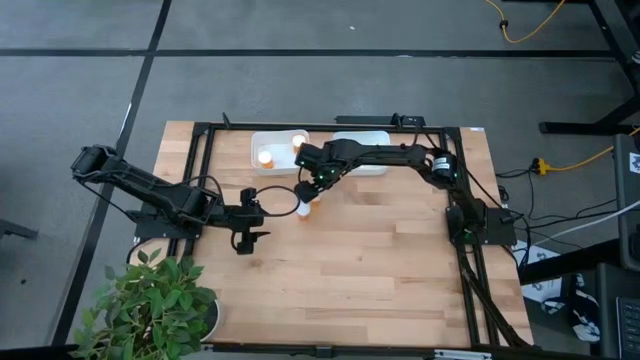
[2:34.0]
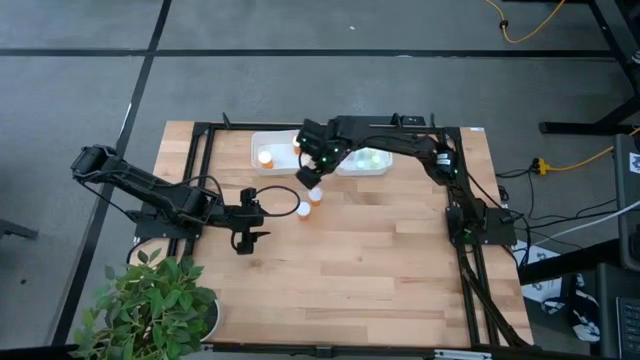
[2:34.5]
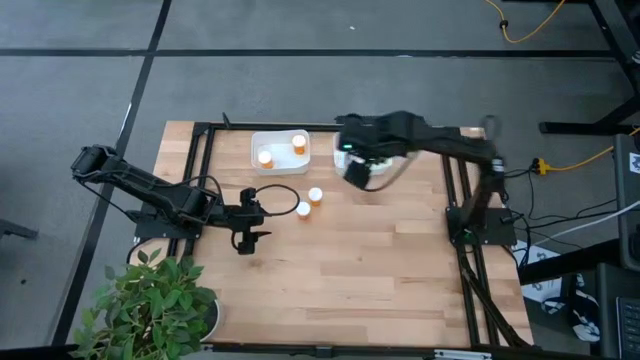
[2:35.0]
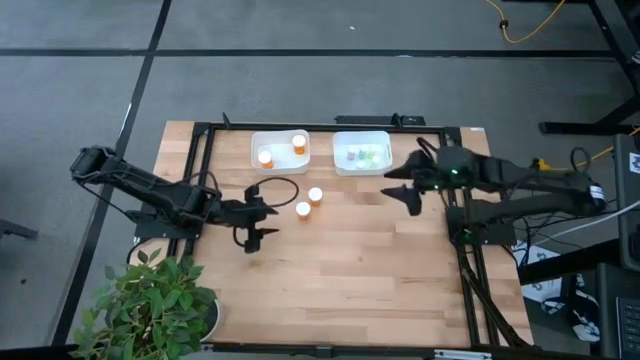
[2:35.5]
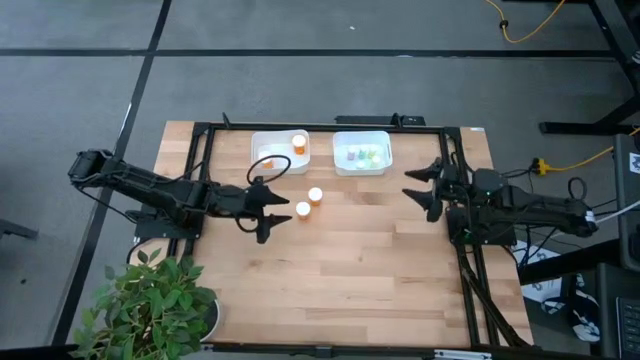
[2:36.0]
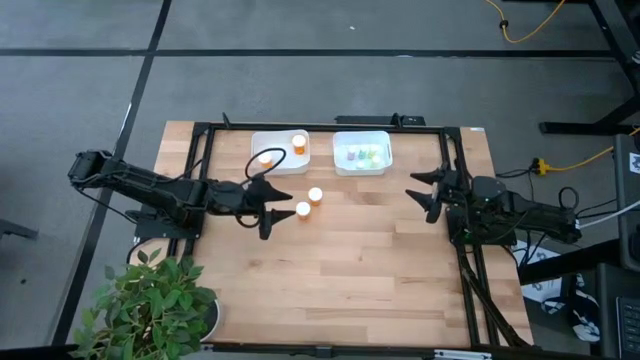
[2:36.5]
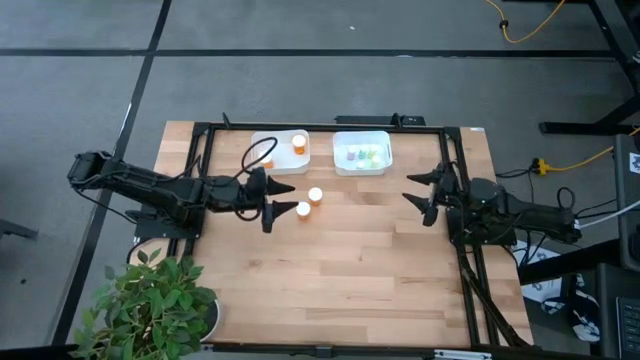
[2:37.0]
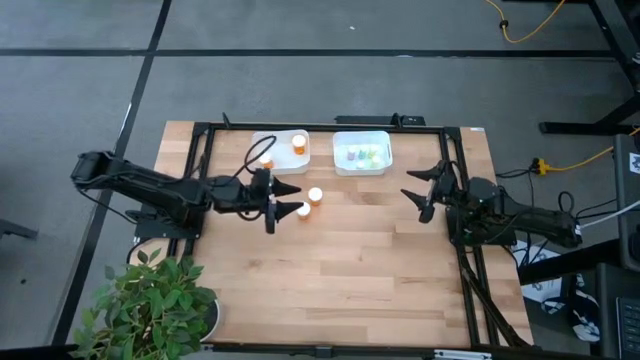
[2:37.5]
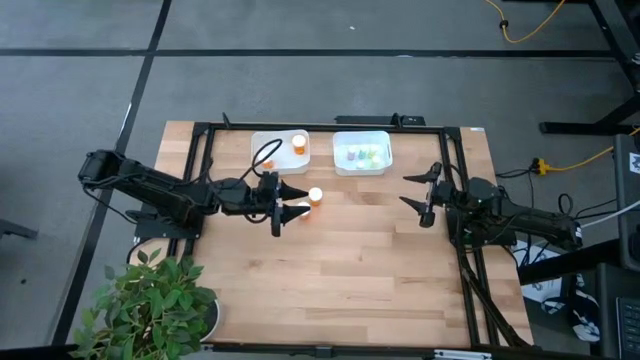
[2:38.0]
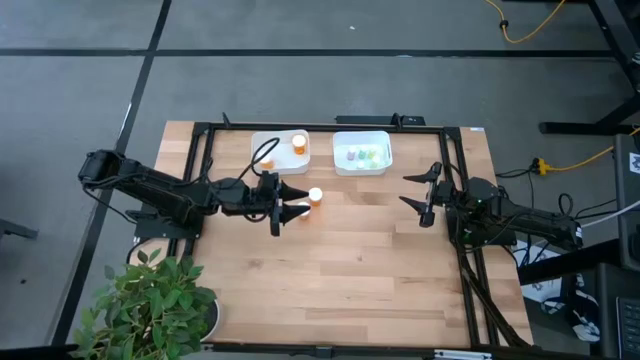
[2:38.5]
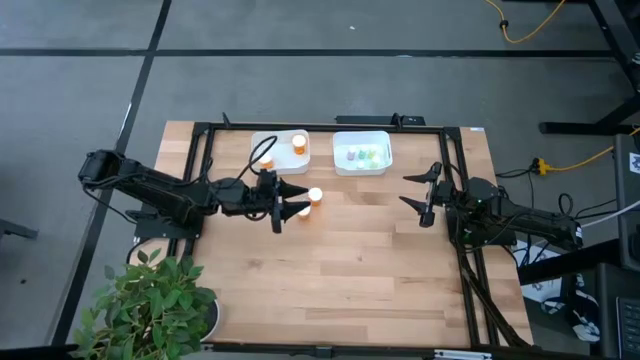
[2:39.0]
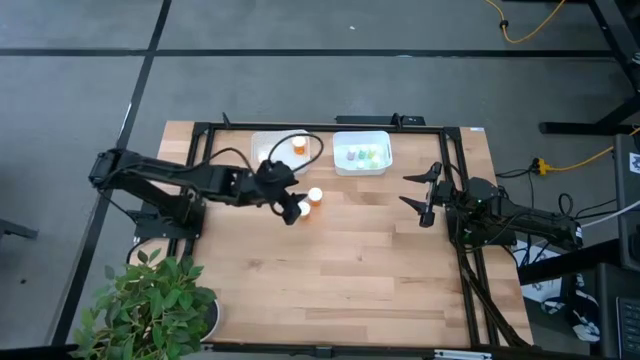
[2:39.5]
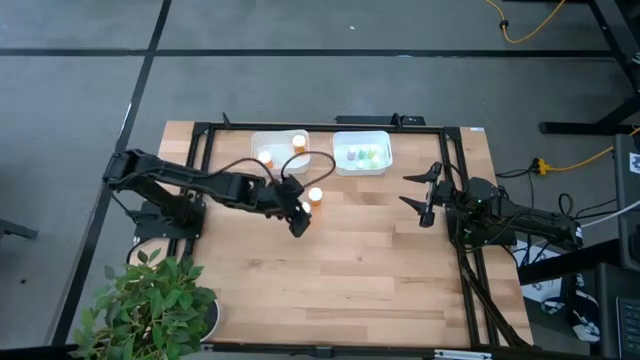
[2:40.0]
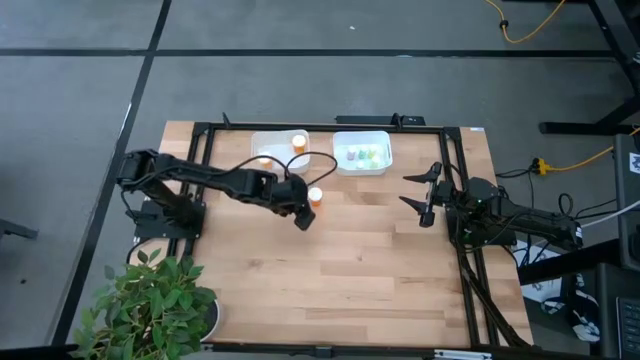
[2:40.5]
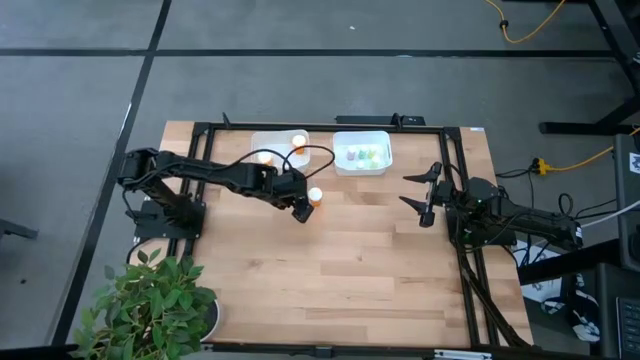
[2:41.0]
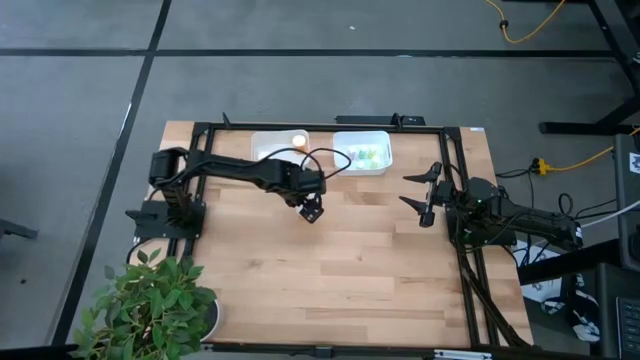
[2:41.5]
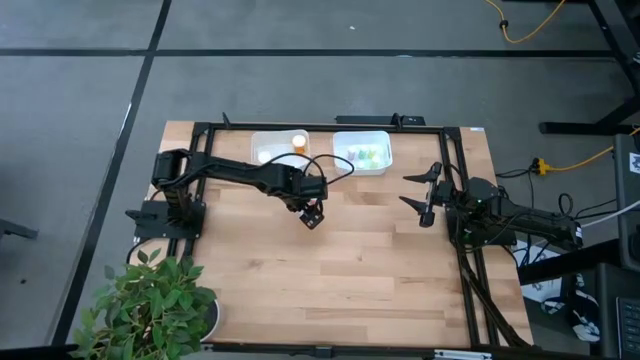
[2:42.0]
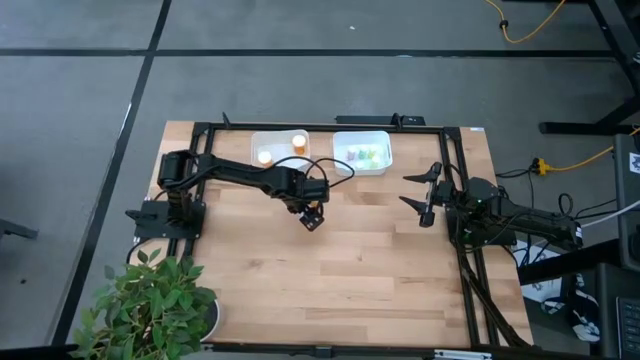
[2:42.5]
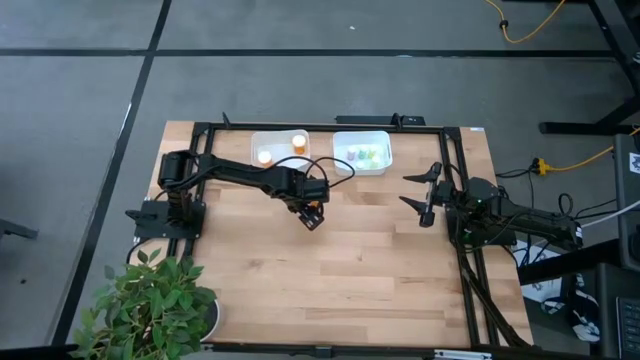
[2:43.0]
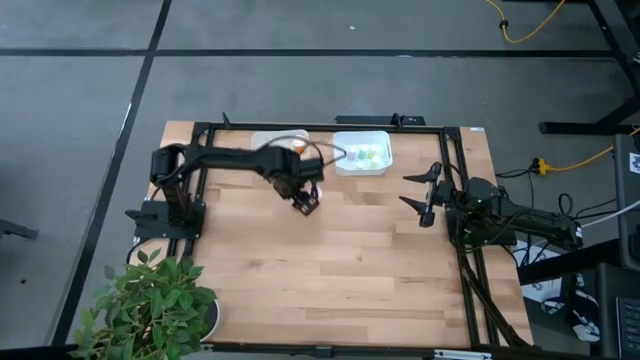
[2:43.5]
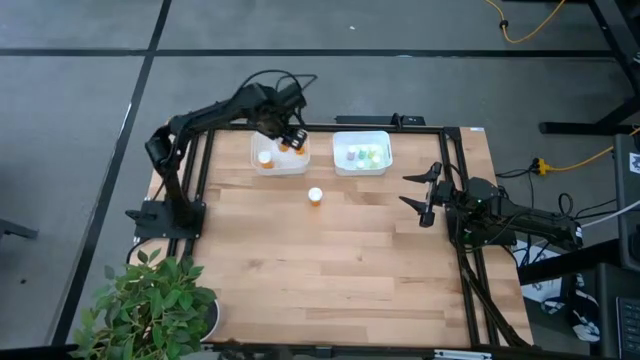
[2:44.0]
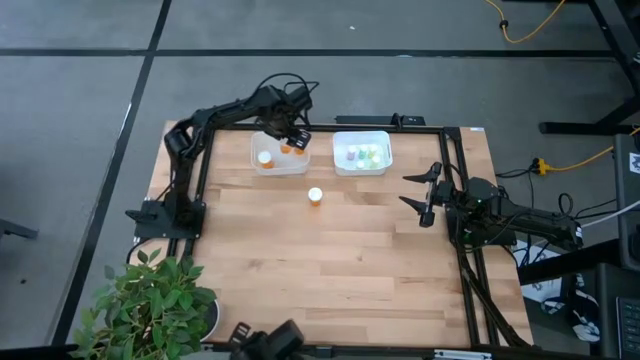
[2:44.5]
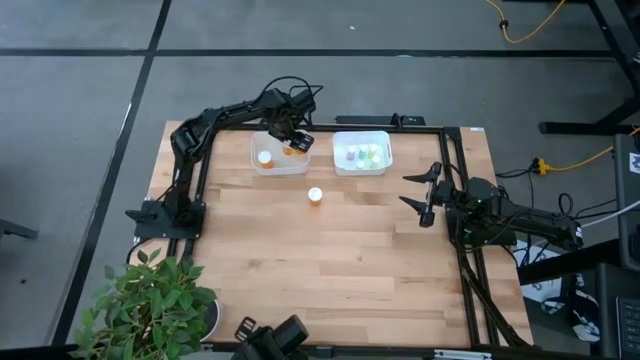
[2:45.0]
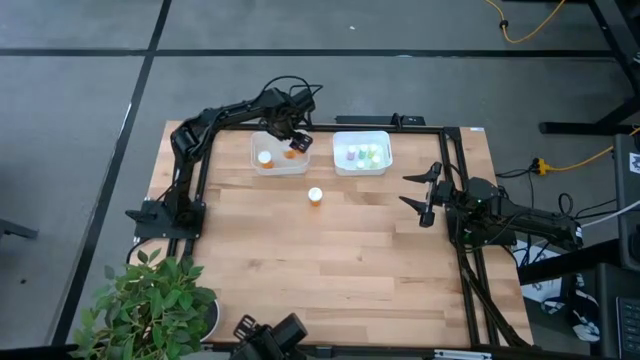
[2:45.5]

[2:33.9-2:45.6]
Task: Pick and place medicine bottles into bin by pill shape (circle, oval)
Put the orange pill bottle into the left white bin

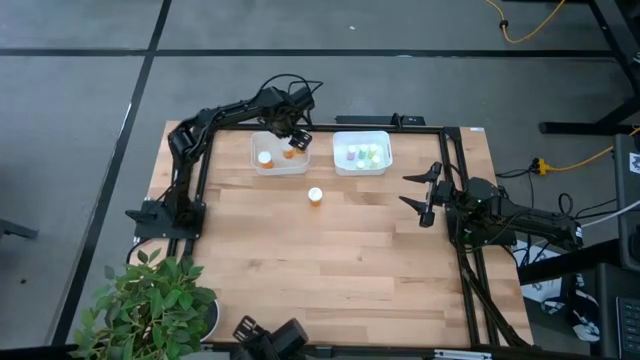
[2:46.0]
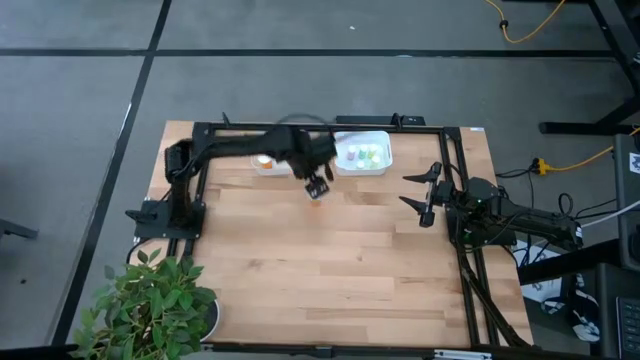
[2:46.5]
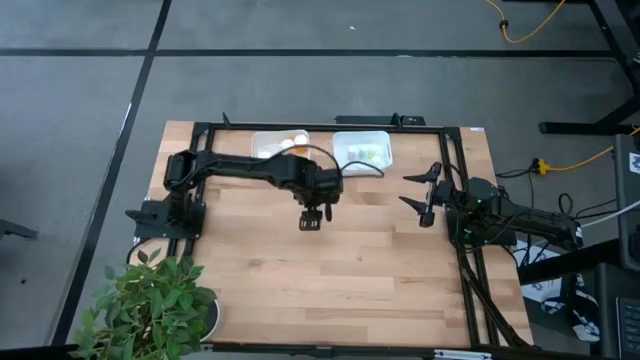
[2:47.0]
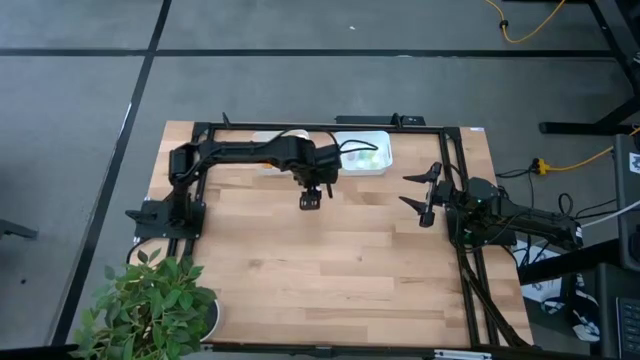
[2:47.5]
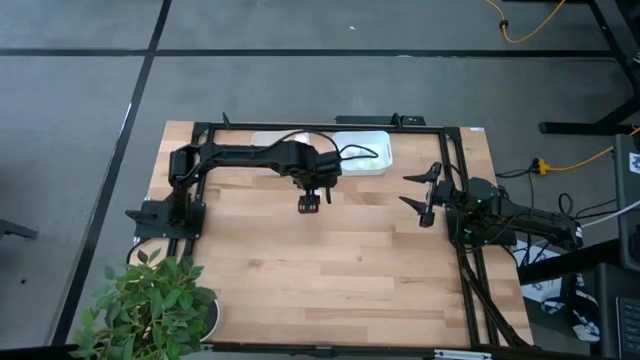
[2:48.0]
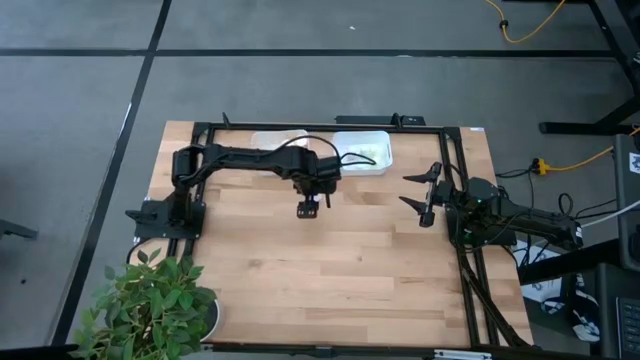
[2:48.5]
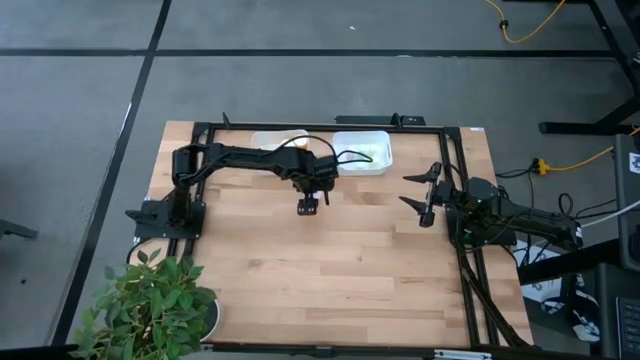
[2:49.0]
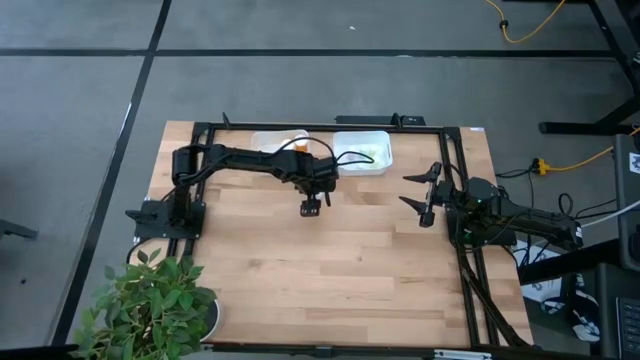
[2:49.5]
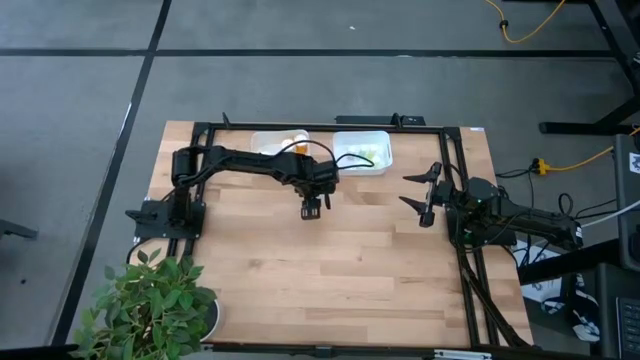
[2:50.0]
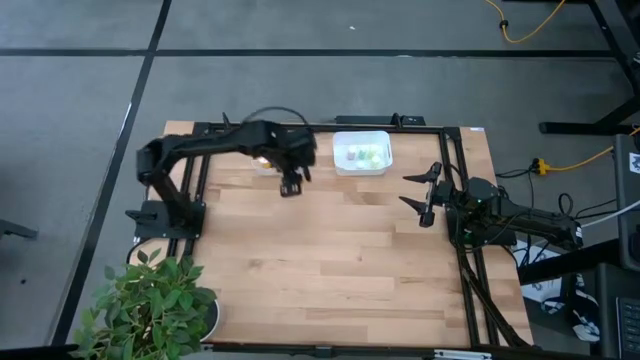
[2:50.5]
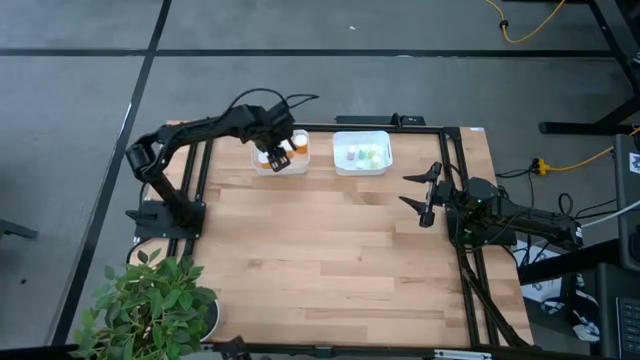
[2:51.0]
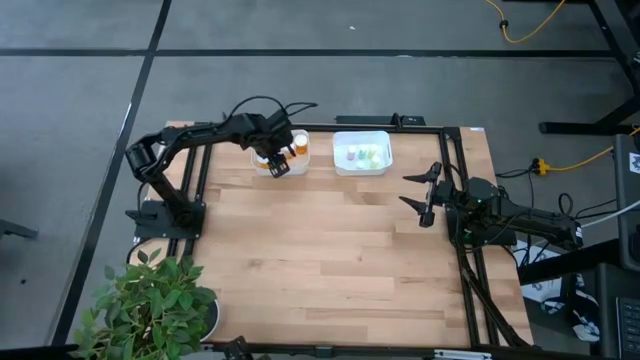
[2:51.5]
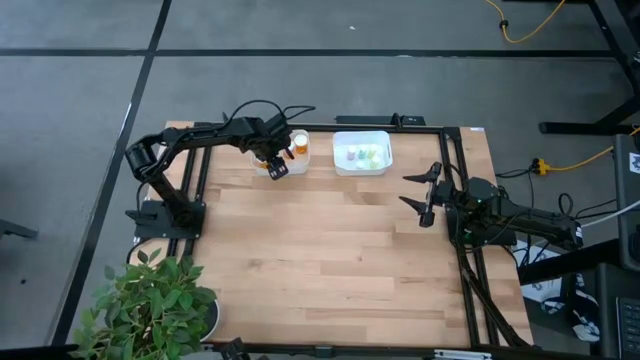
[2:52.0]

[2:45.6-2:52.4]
Put the orange pill bottle into the left white bin

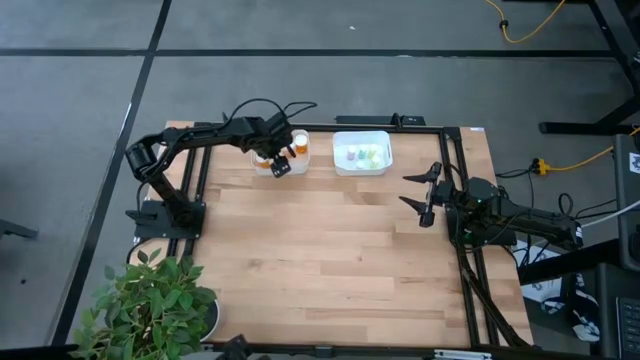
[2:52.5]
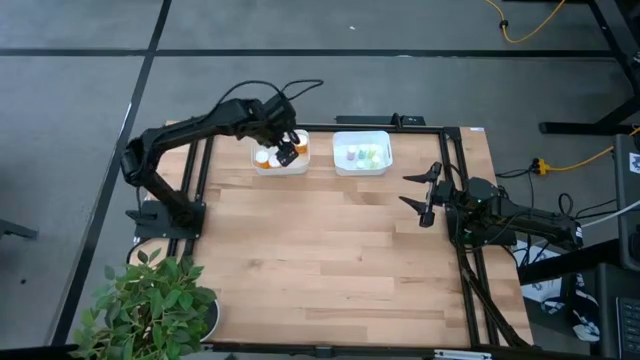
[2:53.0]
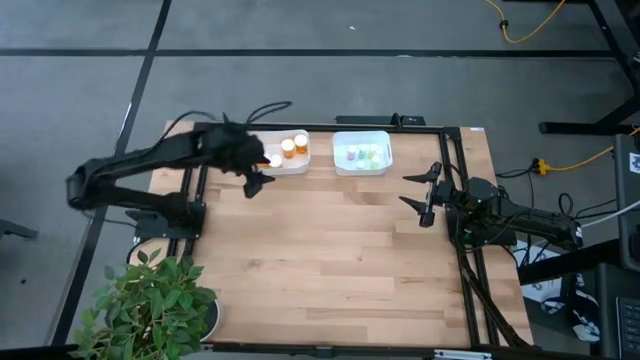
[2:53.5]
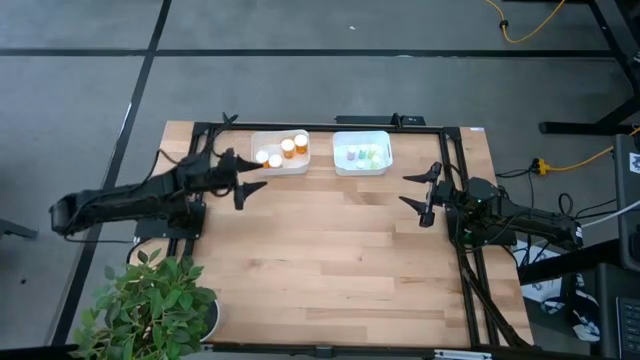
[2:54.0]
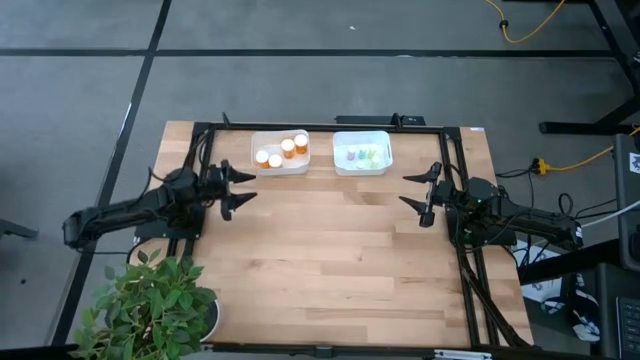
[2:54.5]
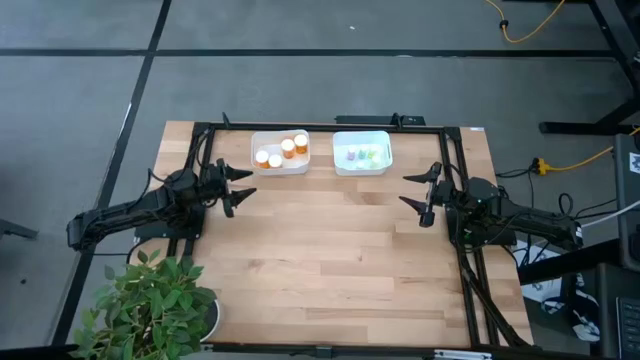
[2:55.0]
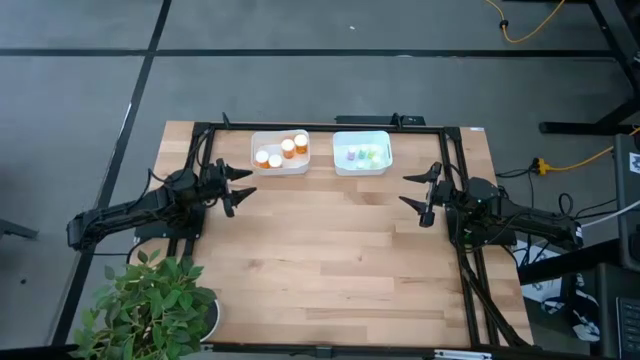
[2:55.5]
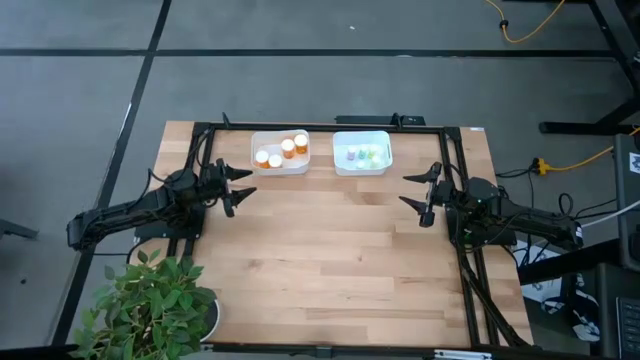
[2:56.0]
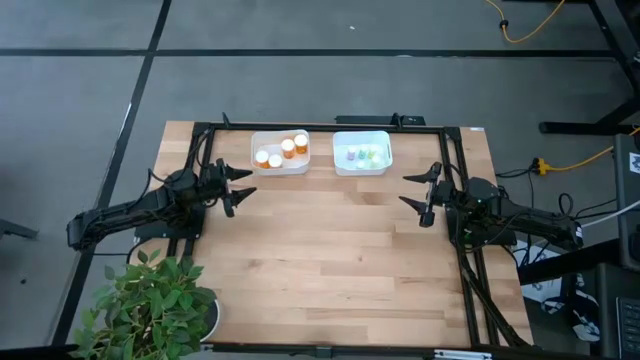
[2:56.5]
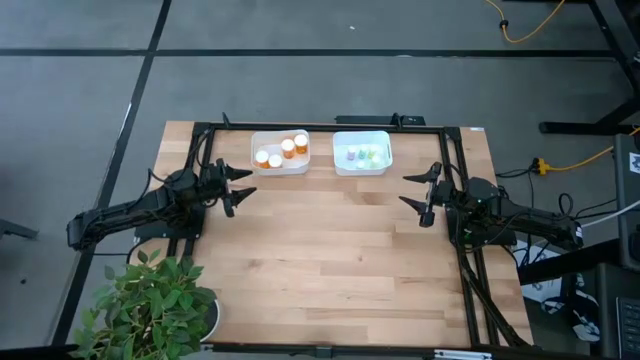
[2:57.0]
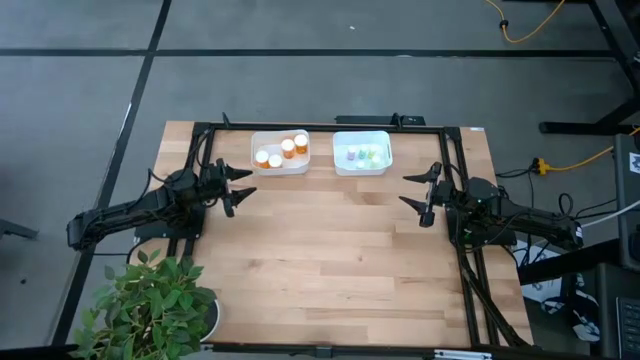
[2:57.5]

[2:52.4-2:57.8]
Return to Home Position
